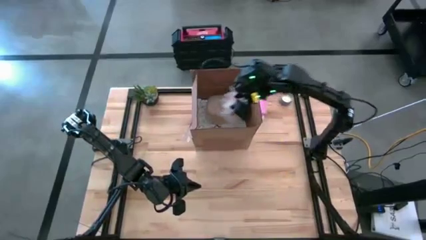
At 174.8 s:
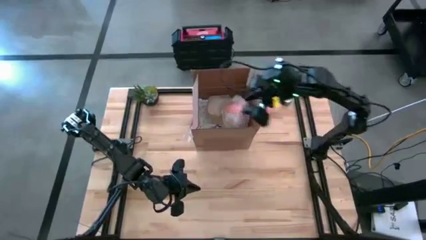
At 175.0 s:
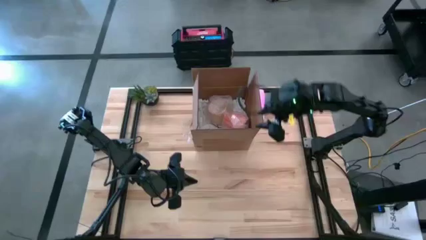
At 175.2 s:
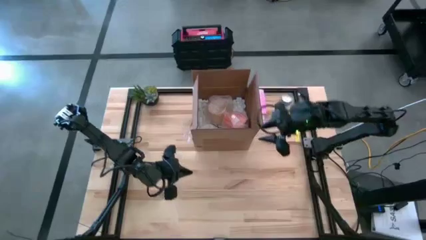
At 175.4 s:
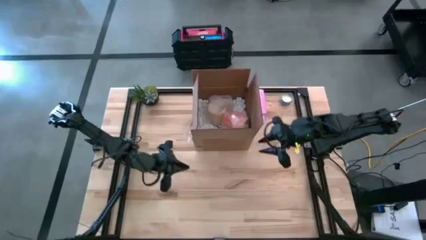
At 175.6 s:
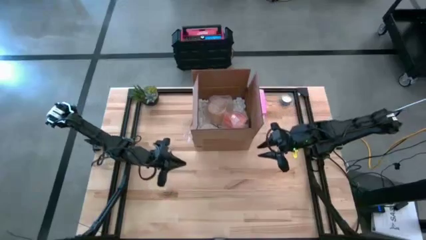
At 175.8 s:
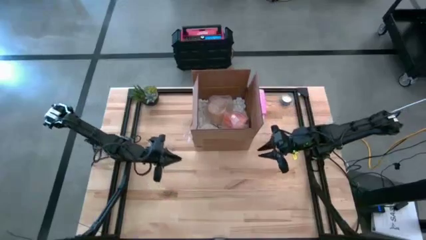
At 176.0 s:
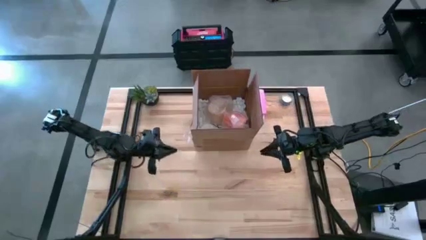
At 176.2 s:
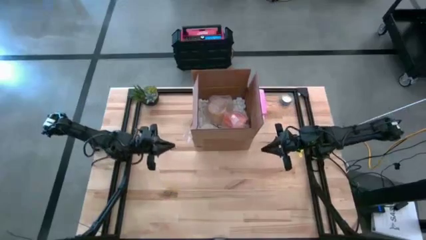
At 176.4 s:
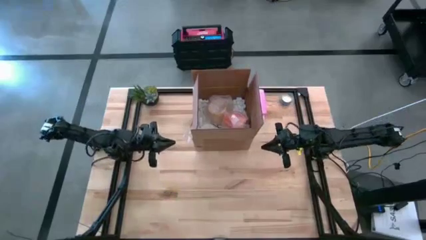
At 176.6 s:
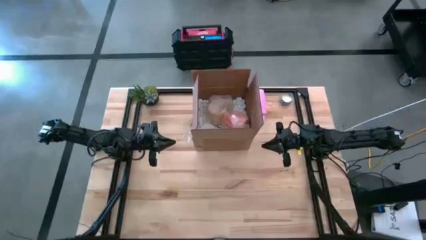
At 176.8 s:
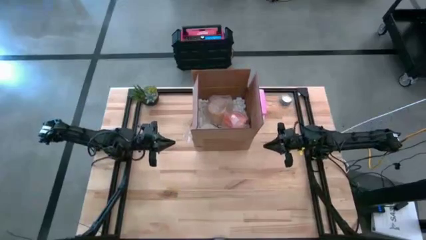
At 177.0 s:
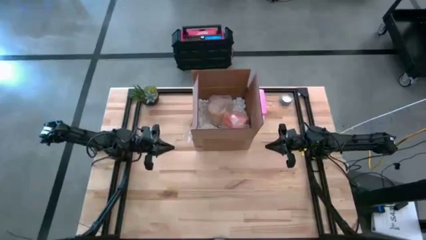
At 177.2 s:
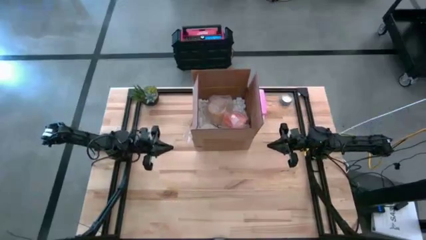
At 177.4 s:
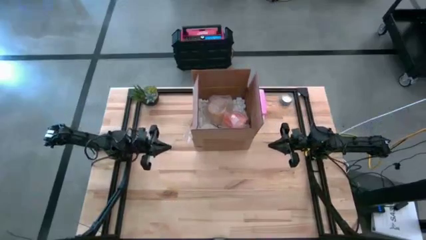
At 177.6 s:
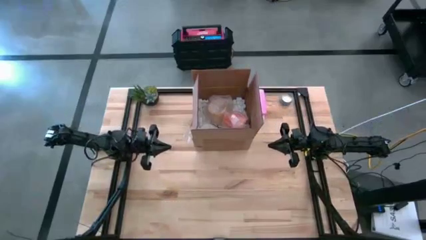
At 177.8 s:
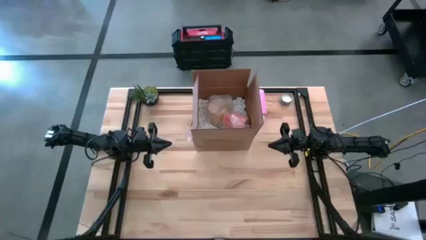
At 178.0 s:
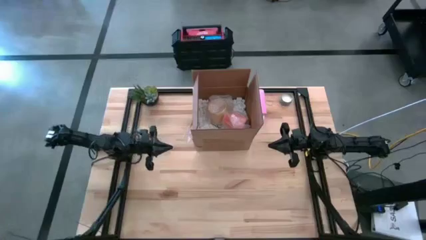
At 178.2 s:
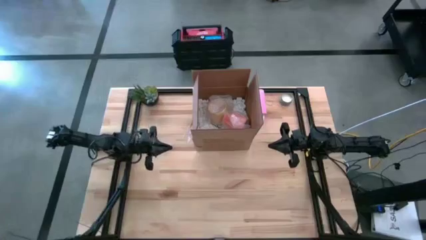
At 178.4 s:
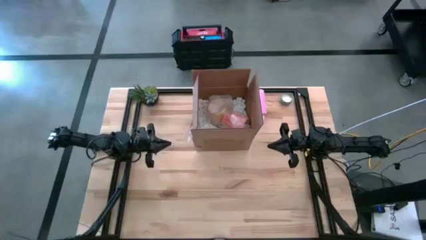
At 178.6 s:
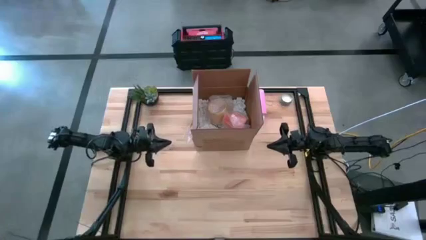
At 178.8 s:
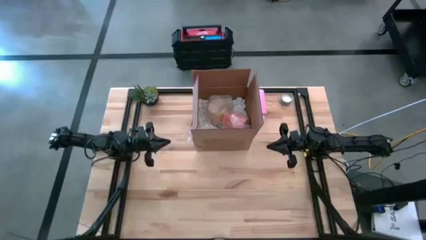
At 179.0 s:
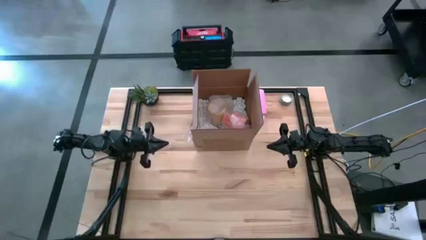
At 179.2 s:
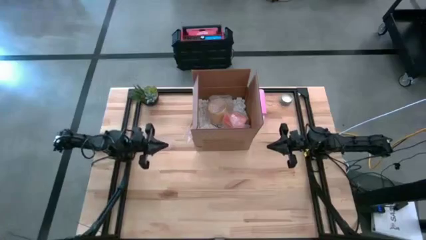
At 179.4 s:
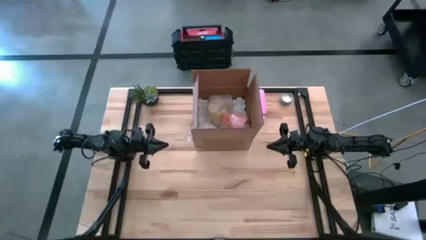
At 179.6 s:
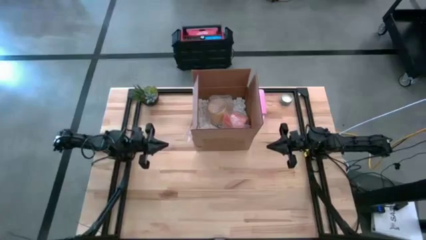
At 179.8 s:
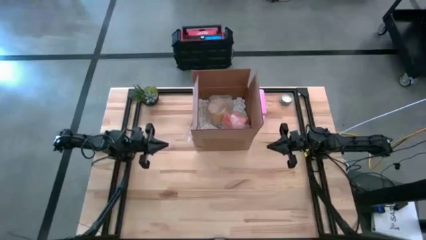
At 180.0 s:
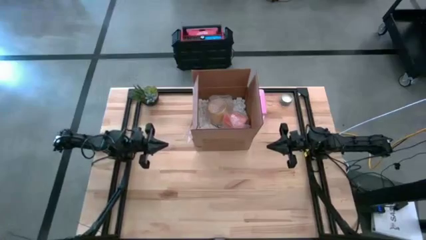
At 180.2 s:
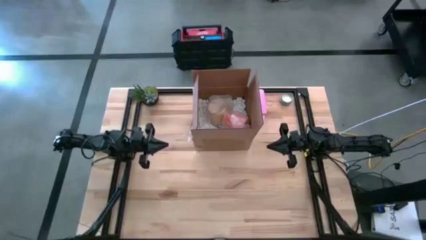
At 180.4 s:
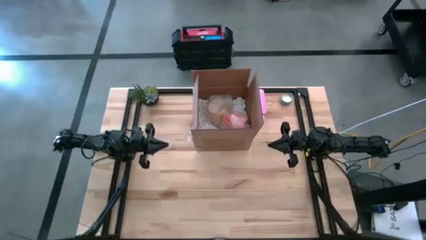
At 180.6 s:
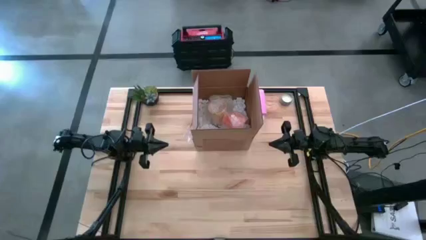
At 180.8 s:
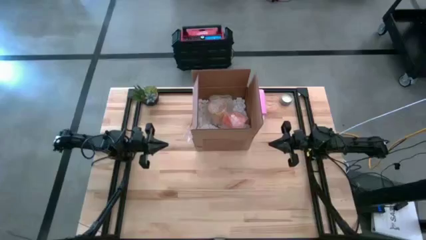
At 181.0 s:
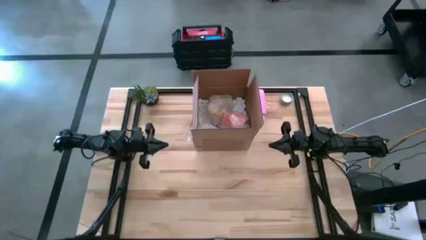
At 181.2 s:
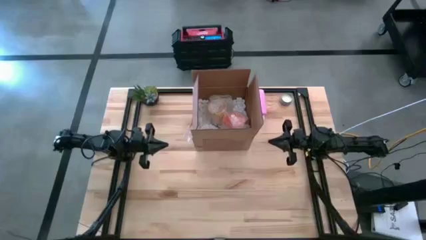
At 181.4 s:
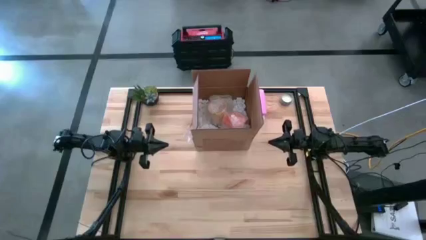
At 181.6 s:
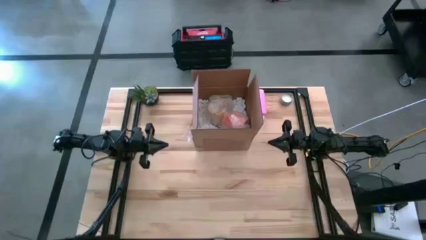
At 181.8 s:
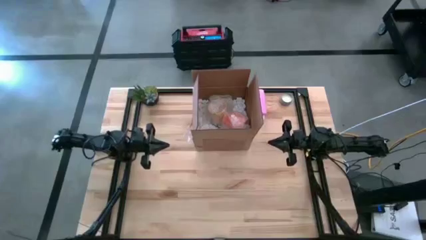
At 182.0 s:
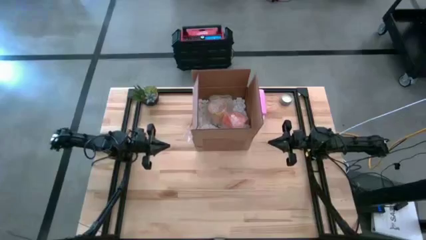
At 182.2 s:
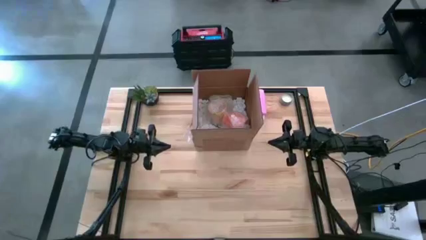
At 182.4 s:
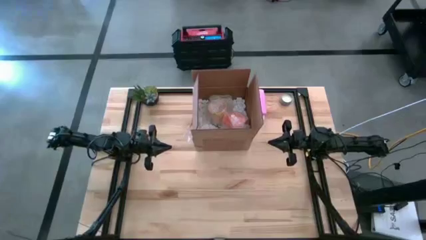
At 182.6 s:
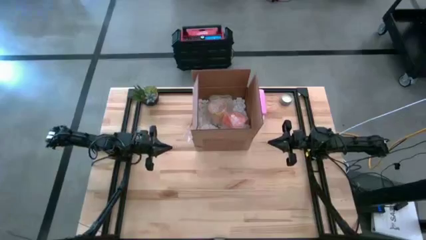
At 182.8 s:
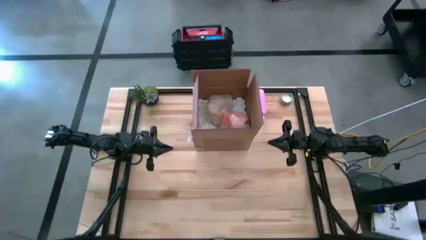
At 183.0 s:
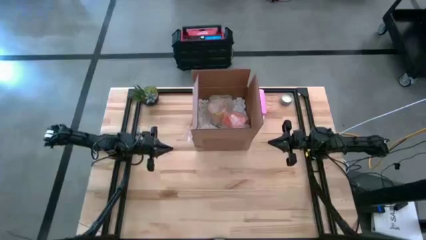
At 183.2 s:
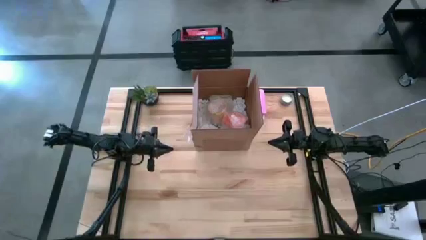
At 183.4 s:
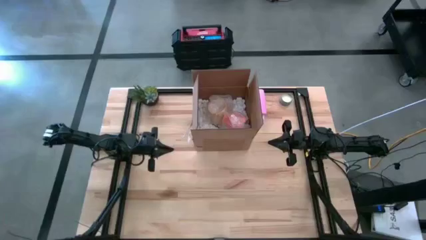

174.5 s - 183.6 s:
Task: wrap mug
Return to Home Position

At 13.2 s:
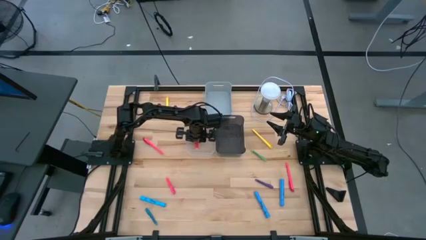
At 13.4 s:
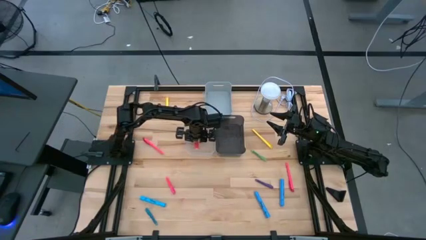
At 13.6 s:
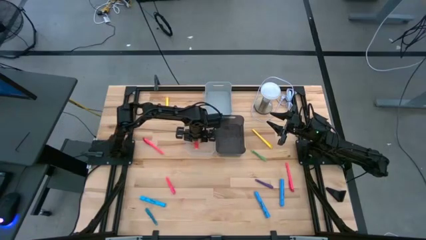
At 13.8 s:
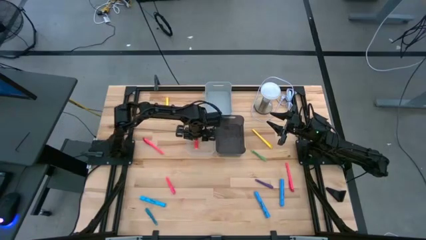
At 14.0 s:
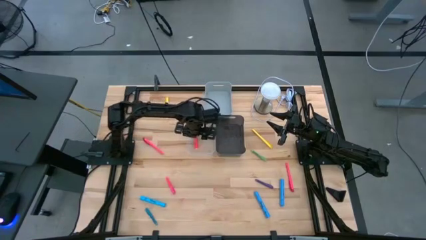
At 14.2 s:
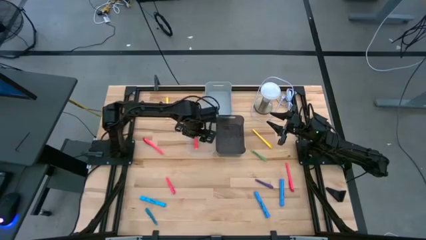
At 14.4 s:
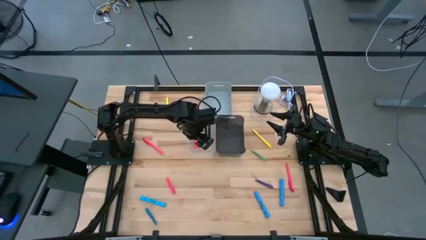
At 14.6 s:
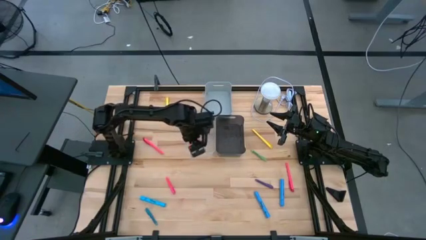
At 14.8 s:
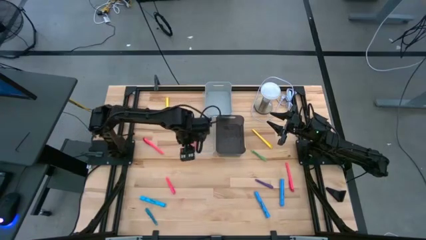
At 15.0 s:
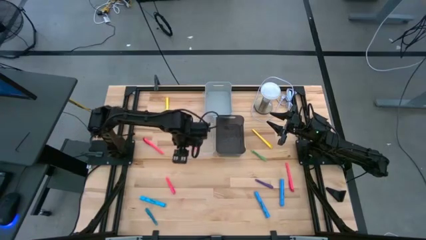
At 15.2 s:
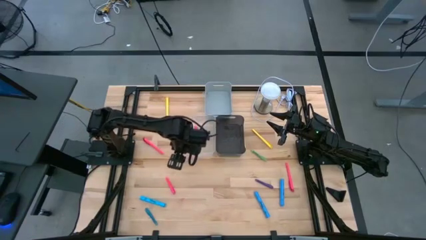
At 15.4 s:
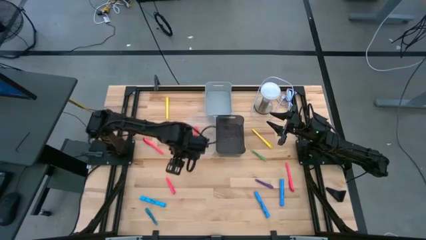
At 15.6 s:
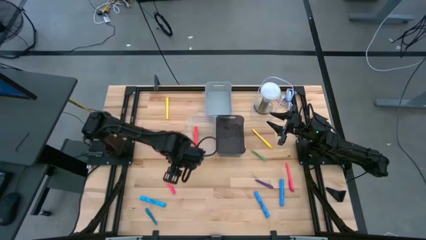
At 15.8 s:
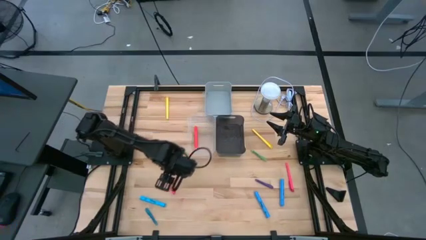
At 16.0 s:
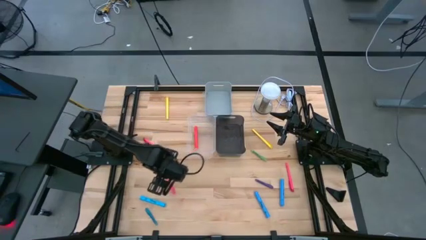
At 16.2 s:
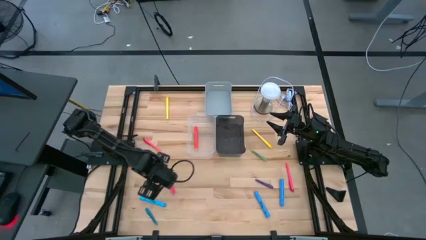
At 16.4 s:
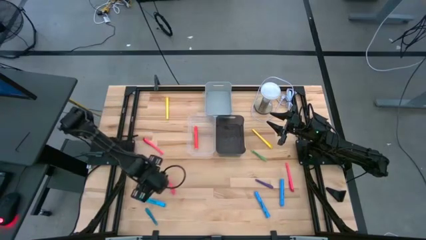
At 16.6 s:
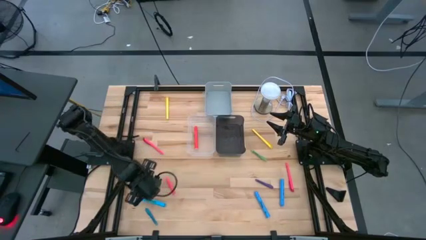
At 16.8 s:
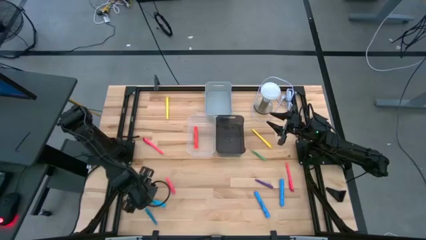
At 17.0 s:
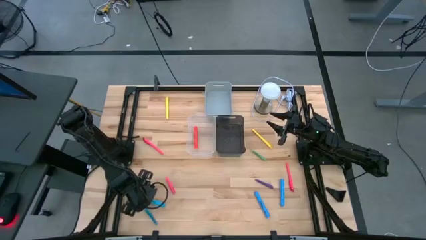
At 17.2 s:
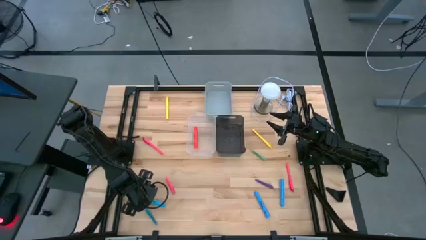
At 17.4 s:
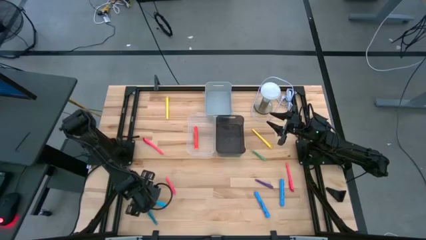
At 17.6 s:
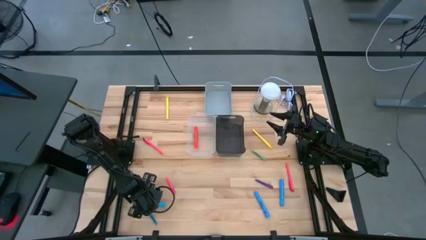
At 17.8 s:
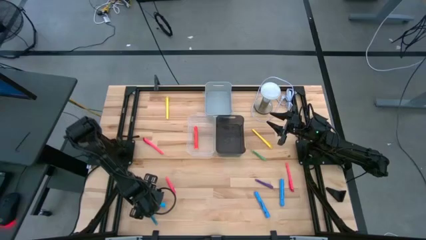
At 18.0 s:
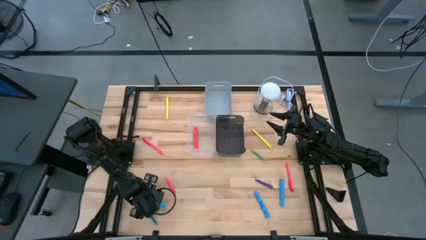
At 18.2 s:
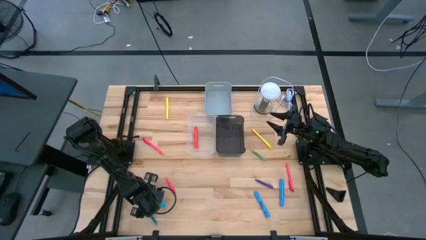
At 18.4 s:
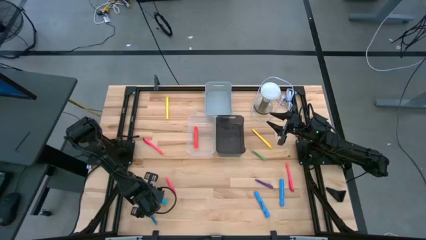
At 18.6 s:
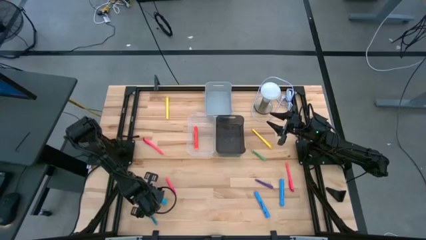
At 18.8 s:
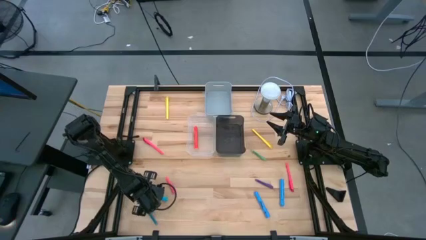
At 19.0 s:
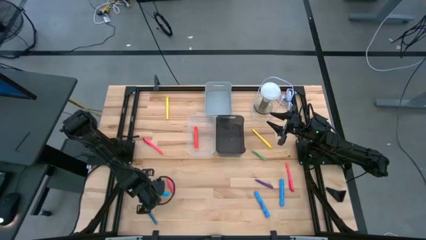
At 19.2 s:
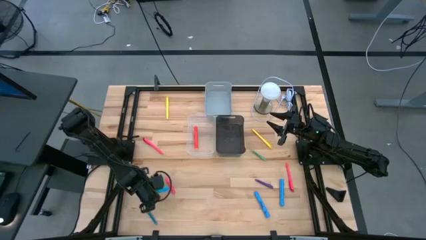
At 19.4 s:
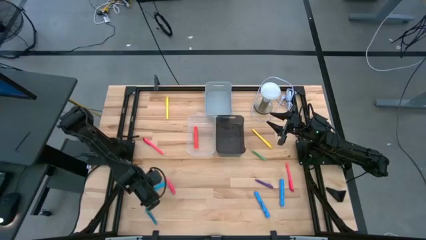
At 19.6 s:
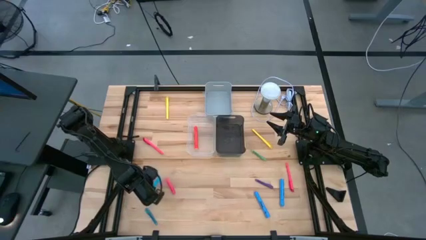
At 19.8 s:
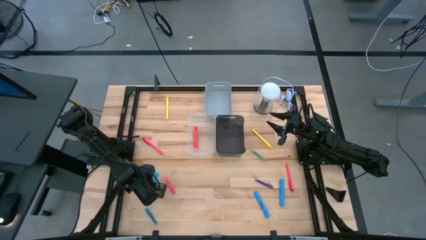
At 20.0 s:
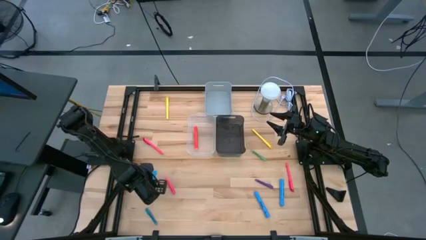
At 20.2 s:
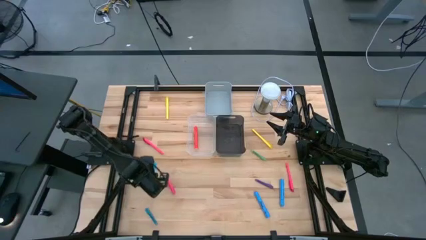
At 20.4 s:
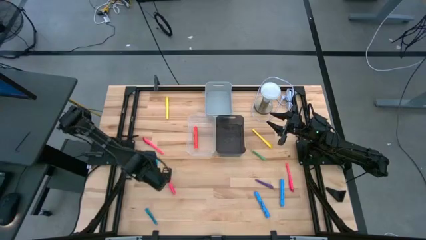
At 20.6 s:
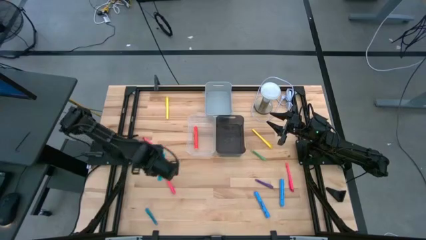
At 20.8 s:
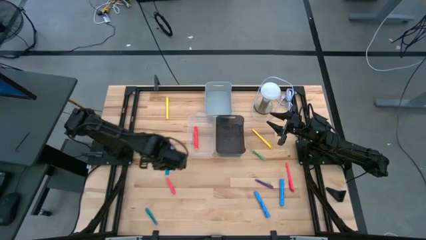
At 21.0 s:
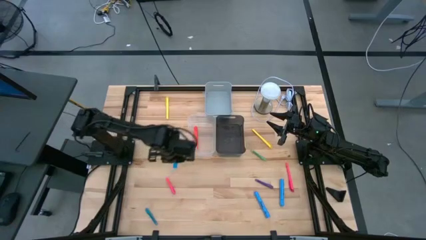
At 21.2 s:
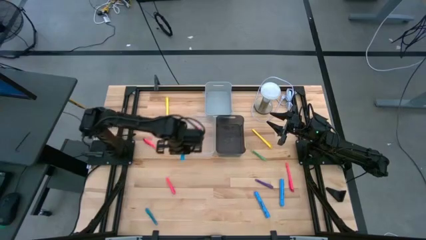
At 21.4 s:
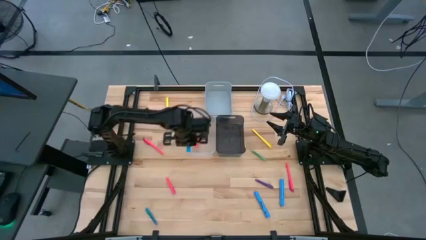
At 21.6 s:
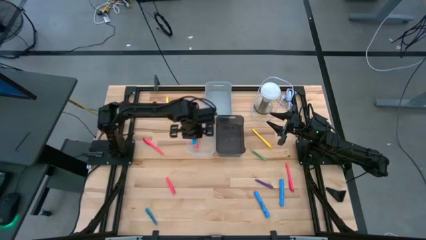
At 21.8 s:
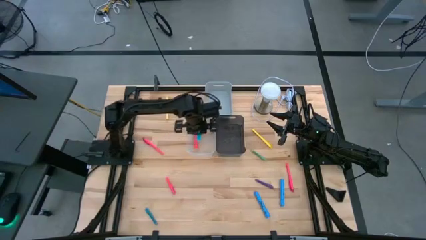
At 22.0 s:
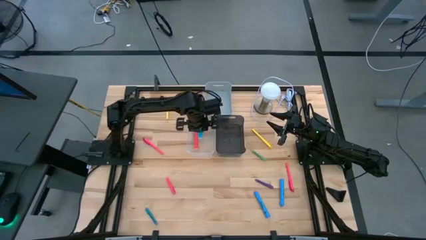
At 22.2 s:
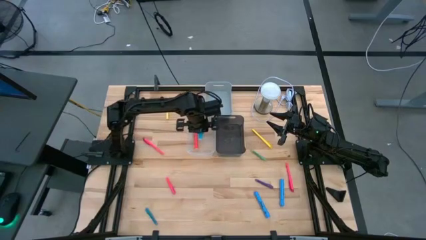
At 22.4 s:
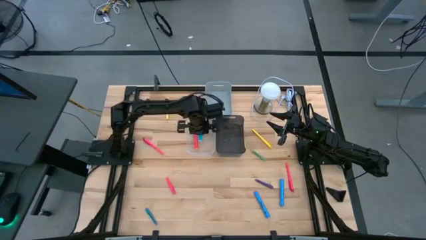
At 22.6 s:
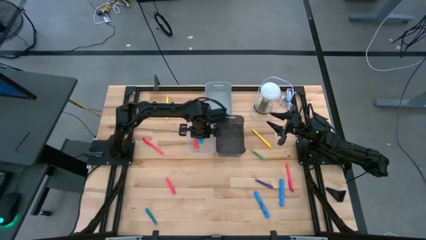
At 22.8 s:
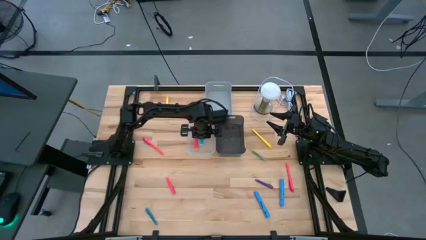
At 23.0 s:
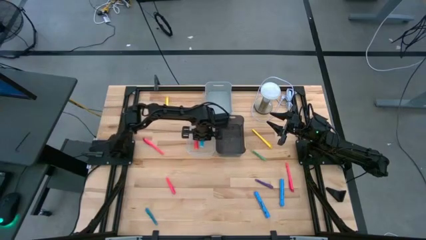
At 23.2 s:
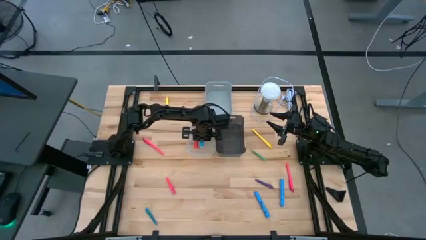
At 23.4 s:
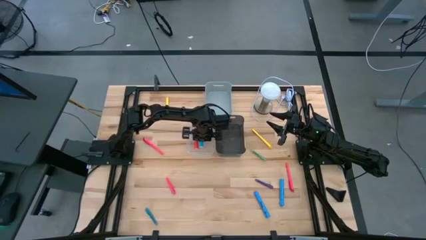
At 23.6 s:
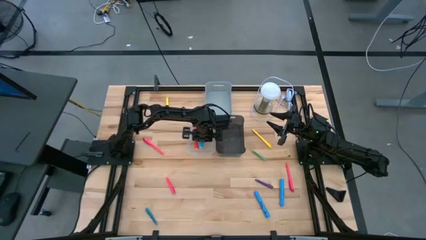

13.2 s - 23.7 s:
Task: Pick & Place Markers
Put the left blue highlighter into the transparent bin
